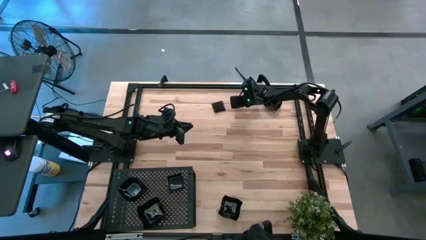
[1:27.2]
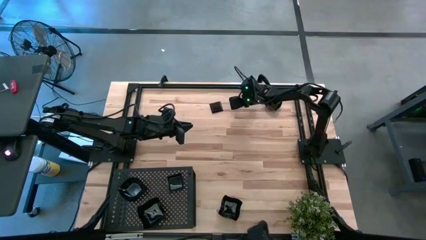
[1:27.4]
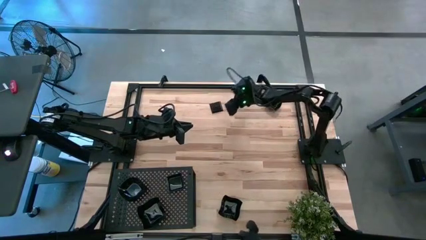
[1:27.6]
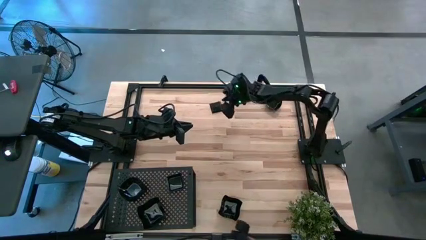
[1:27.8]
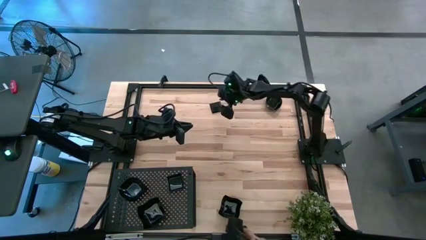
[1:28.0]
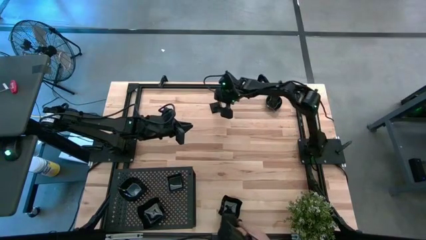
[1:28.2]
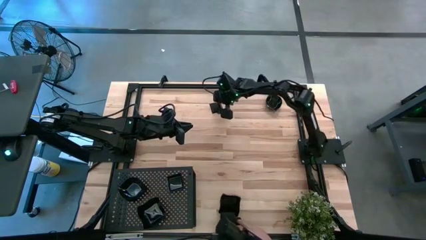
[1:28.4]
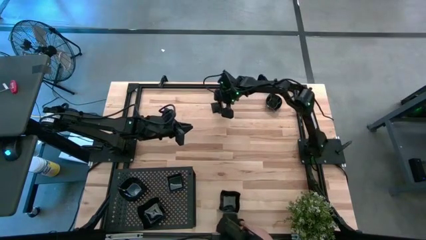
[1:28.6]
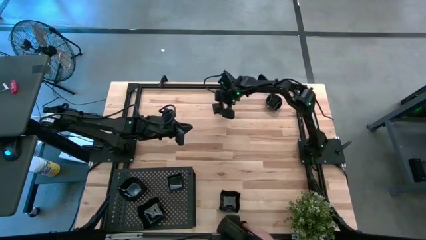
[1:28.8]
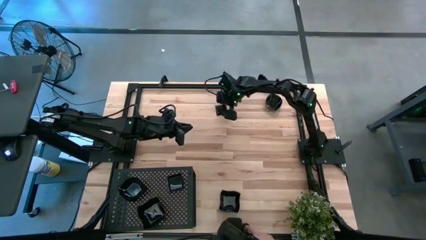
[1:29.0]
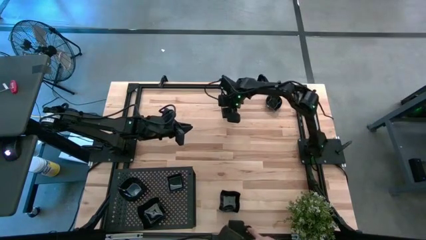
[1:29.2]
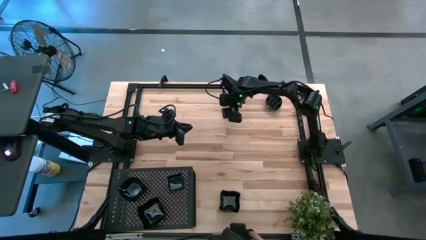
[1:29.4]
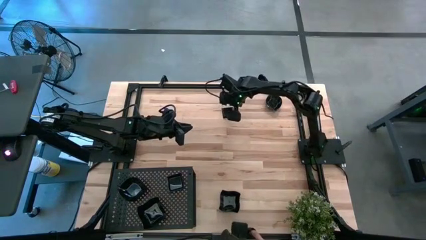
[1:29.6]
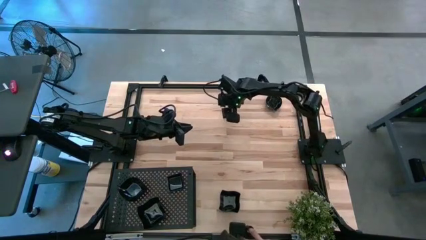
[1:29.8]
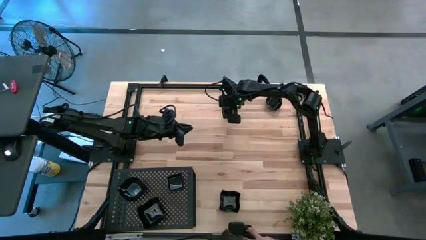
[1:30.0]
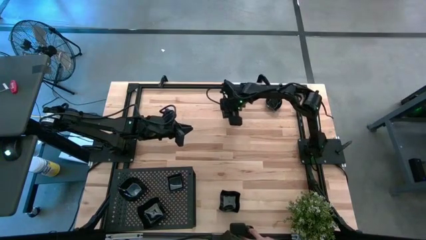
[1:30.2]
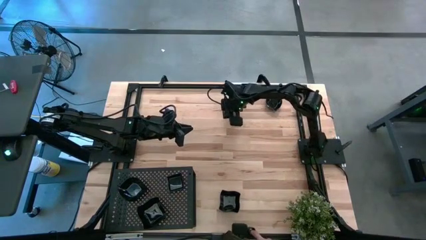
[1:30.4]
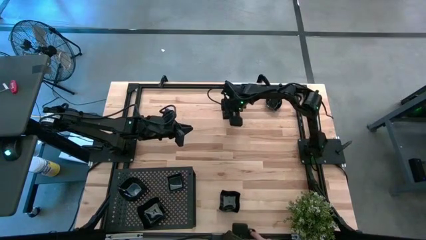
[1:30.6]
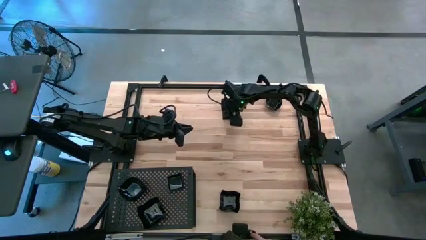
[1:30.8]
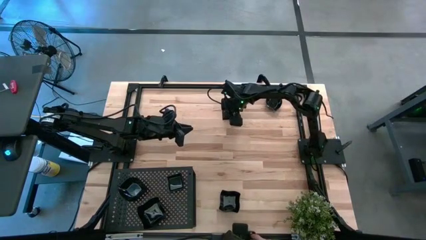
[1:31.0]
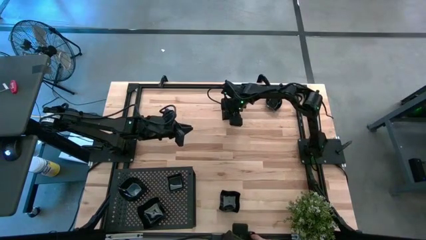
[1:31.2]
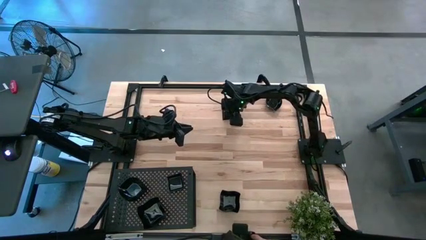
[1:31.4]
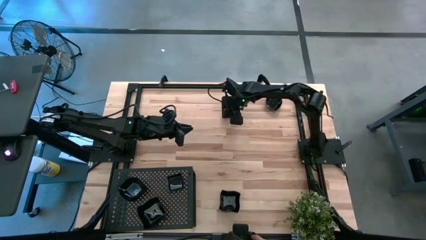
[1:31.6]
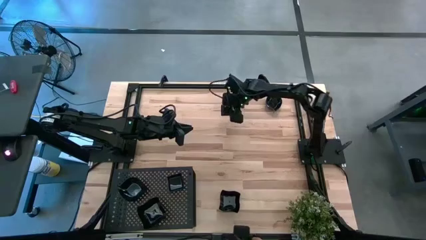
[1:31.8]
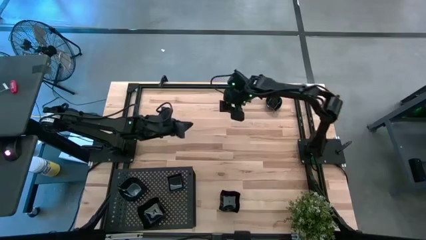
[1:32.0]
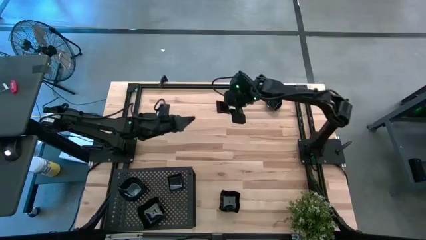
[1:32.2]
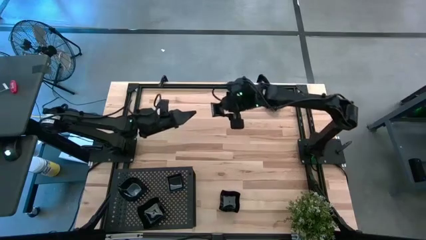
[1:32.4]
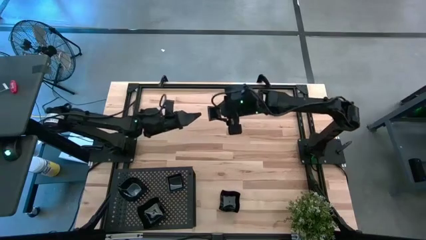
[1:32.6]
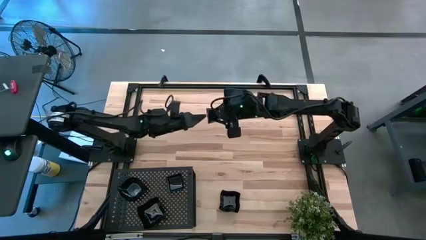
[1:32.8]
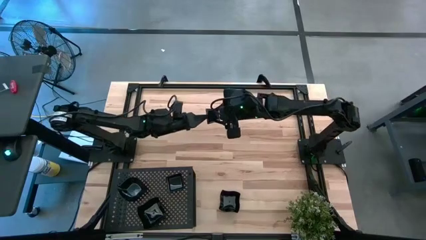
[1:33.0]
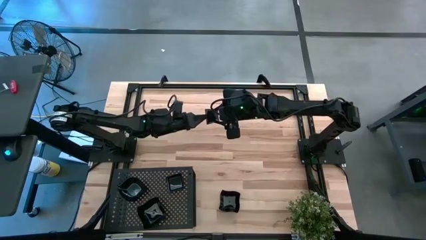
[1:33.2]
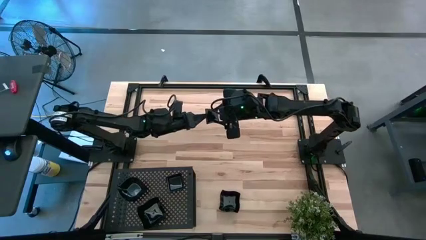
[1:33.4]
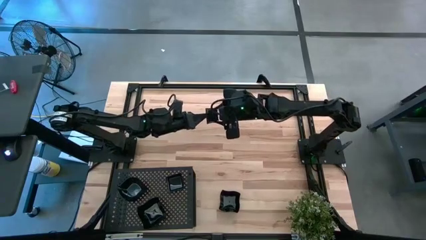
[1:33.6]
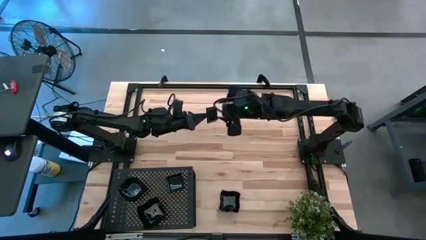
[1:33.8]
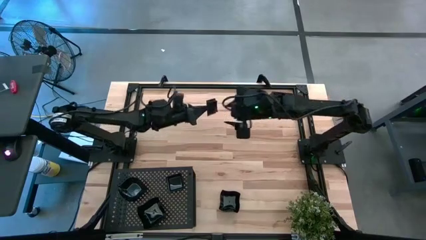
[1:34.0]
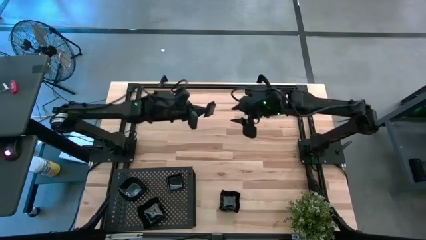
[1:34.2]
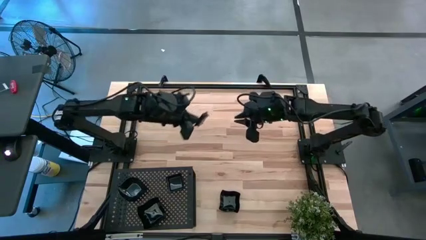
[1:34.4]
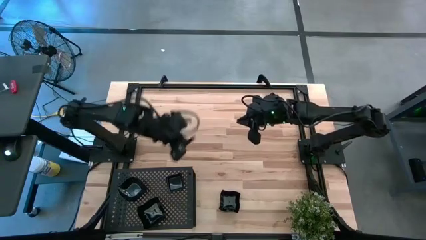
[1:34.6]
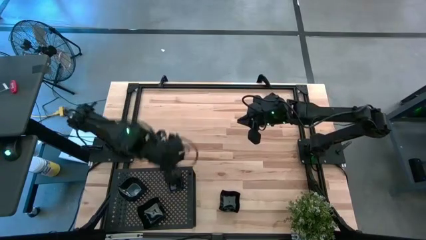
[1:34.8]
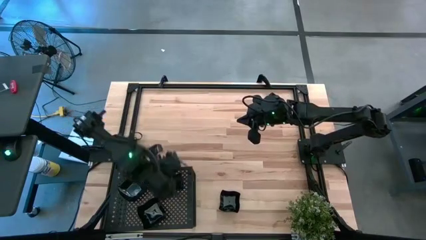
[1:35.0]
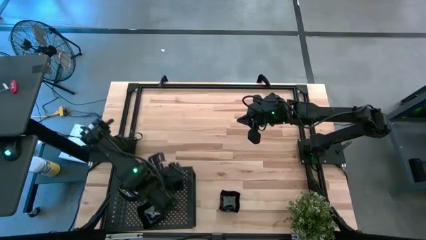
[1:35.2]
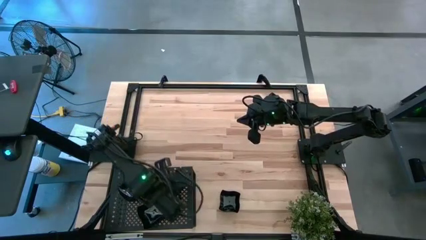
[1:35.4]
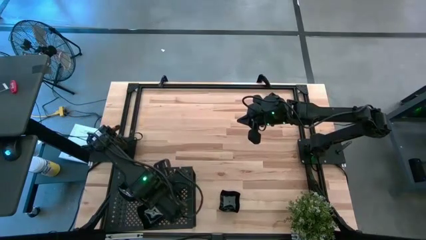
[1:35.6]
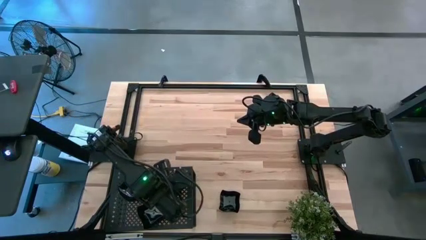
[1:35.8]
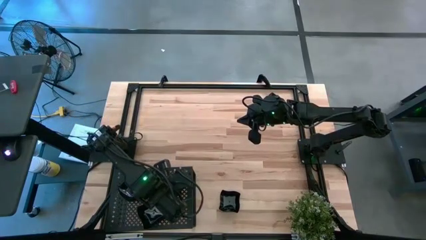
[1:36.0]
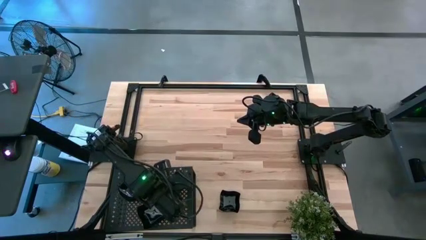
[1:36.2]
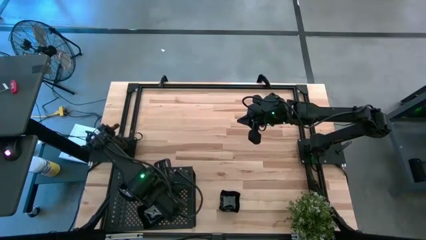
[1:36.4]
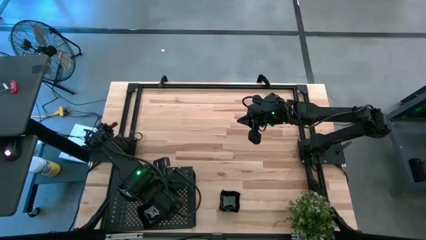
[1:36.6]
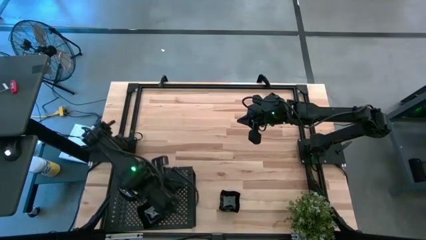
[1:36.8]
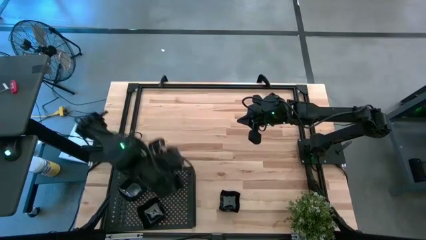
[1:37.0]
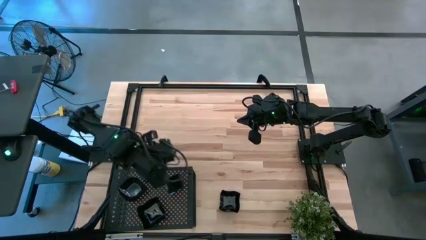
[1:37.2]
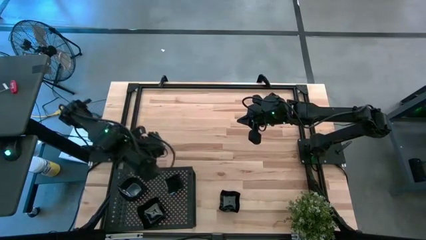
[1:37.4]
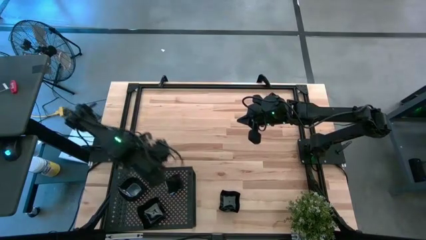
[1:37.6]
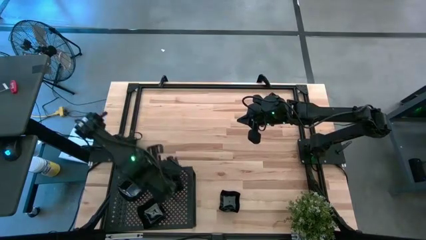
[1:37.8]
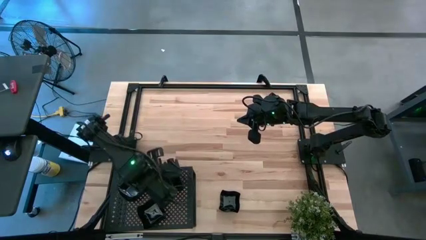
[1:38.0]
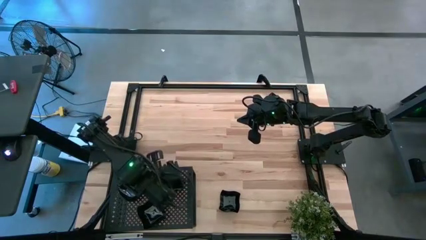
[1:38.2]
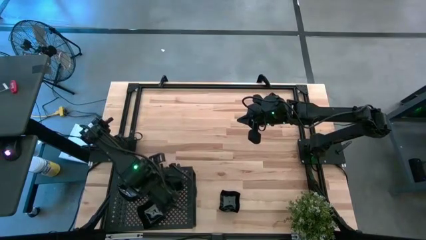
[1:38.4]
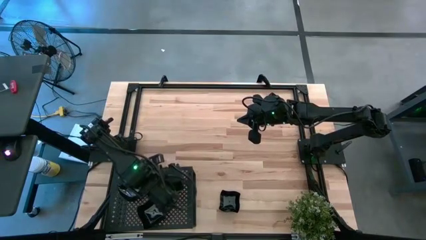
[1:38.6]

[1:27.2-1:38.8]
Task: Pick & Place Mini shaped plates
Stack the square plate on top of the square plate on the shelf
